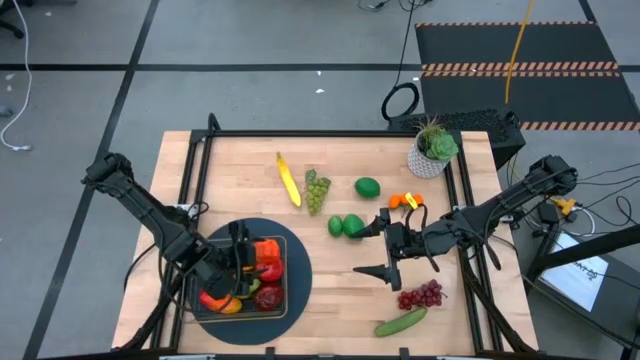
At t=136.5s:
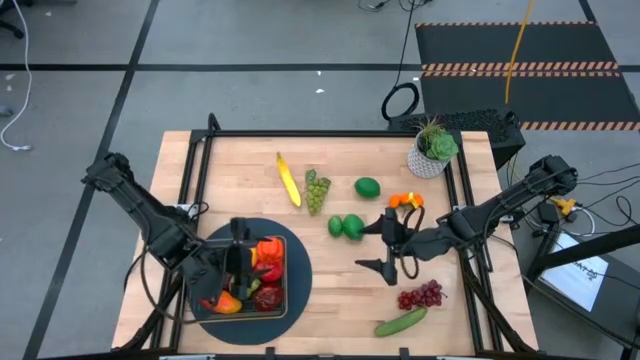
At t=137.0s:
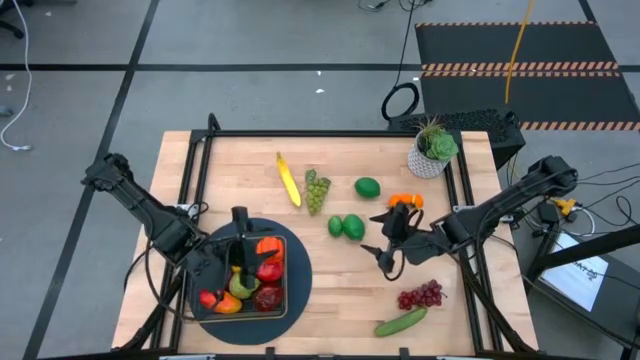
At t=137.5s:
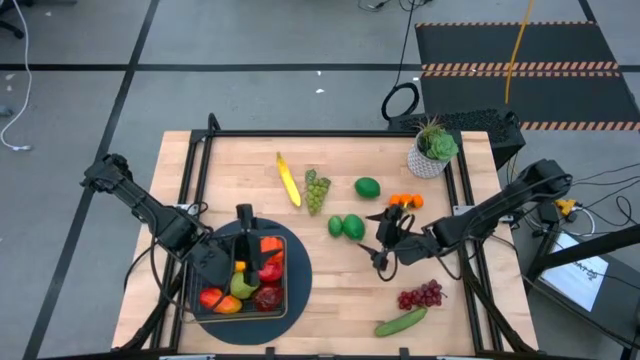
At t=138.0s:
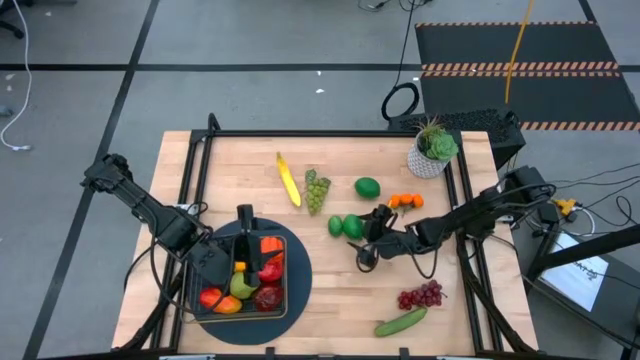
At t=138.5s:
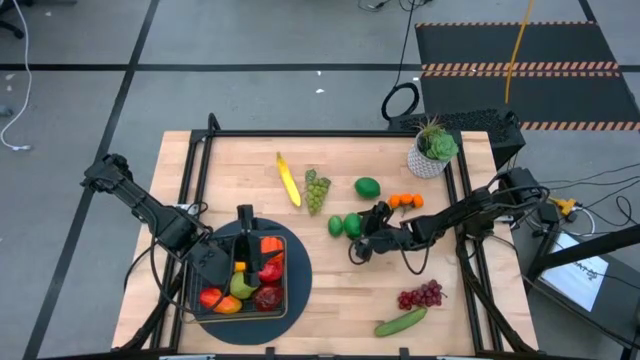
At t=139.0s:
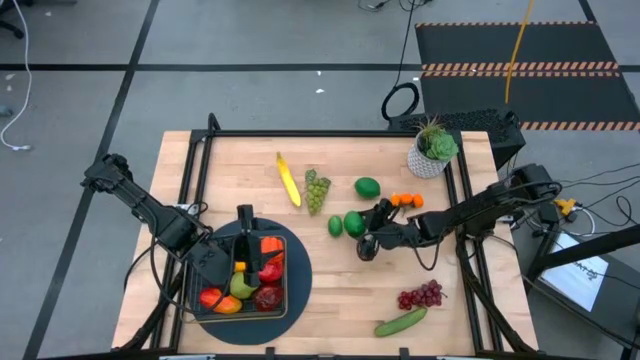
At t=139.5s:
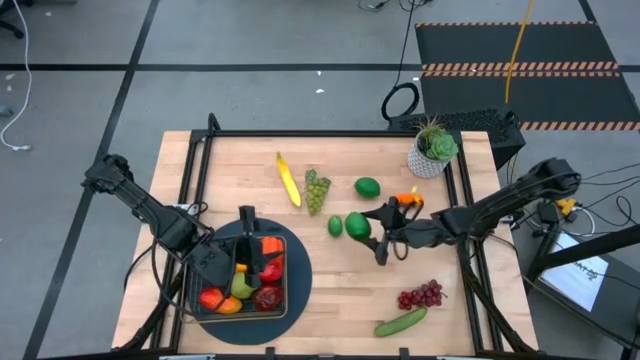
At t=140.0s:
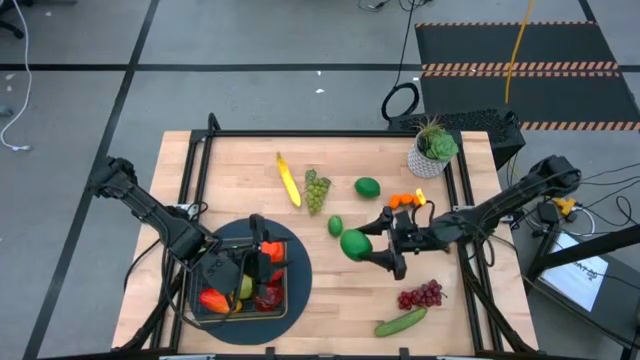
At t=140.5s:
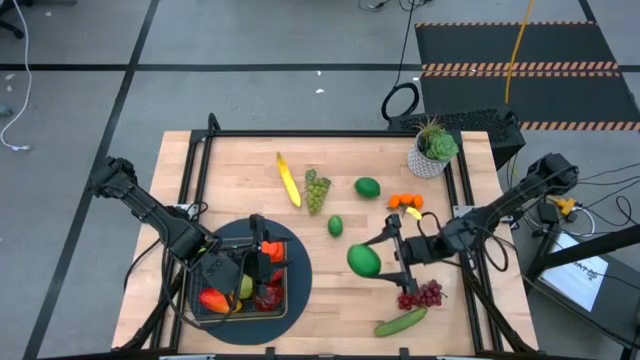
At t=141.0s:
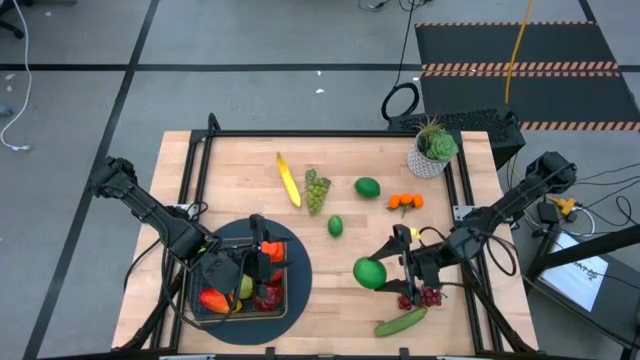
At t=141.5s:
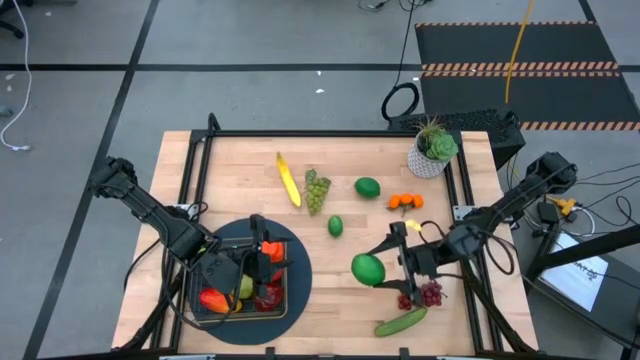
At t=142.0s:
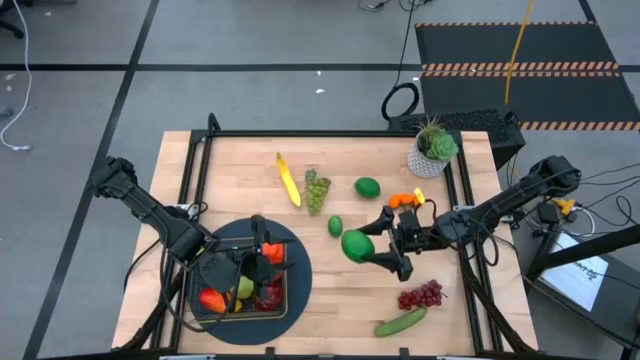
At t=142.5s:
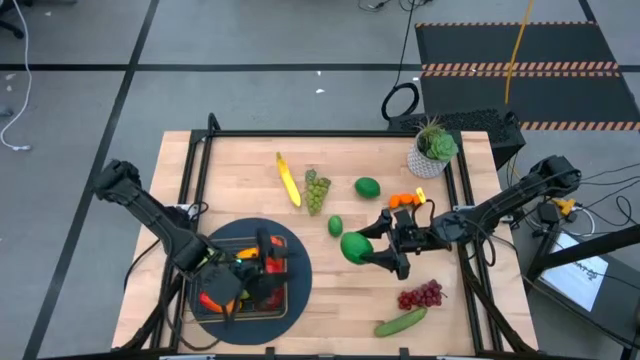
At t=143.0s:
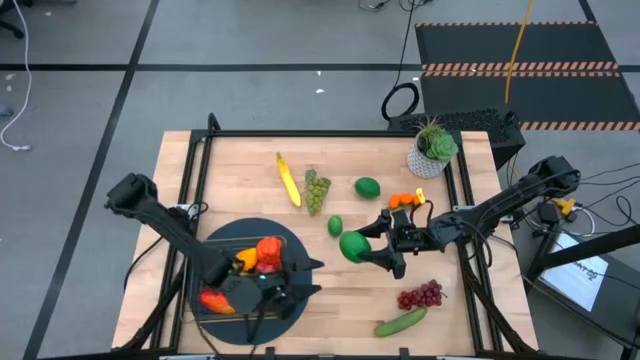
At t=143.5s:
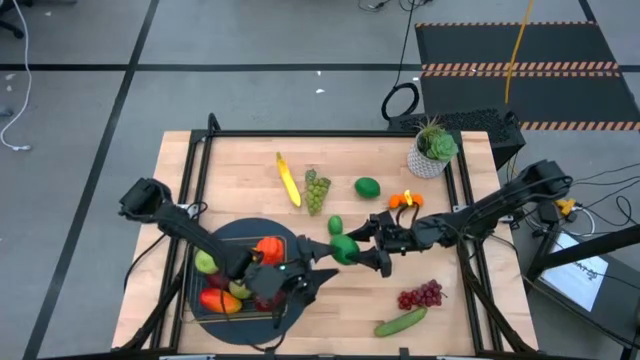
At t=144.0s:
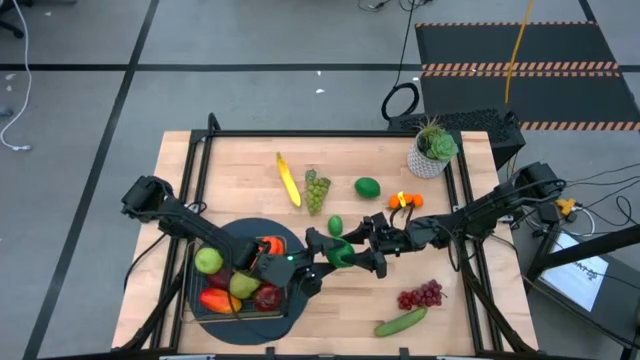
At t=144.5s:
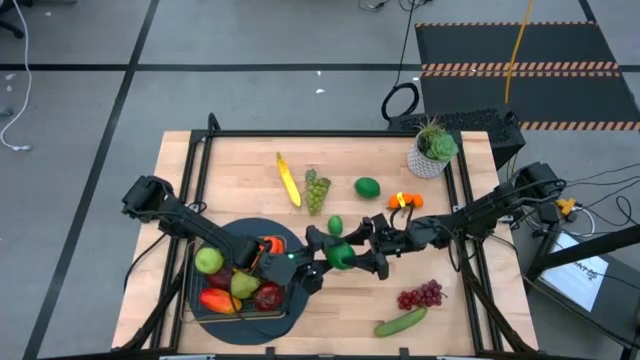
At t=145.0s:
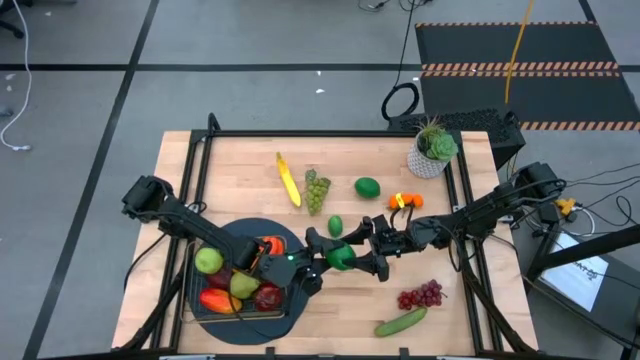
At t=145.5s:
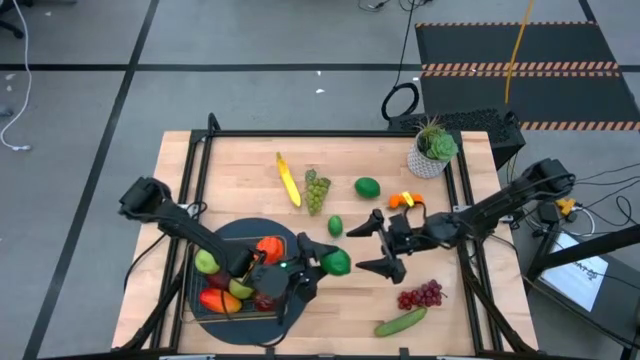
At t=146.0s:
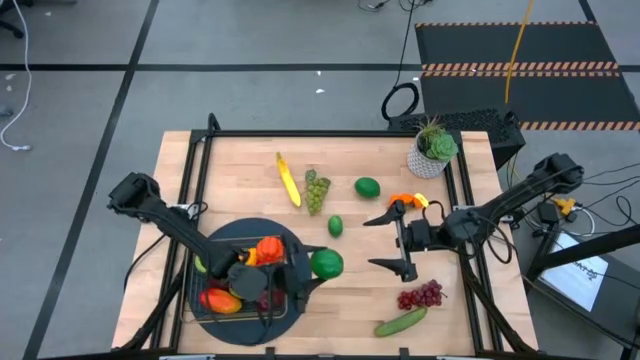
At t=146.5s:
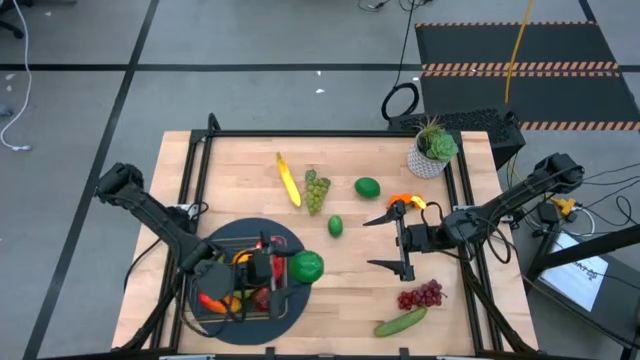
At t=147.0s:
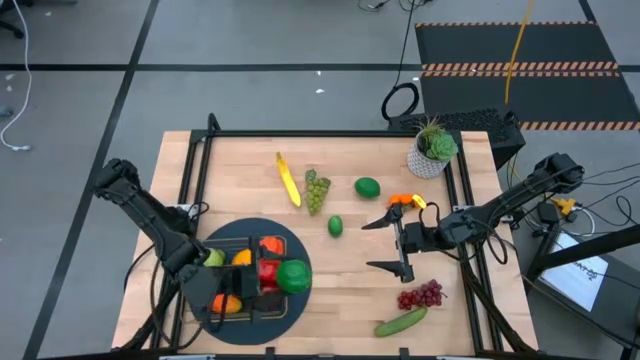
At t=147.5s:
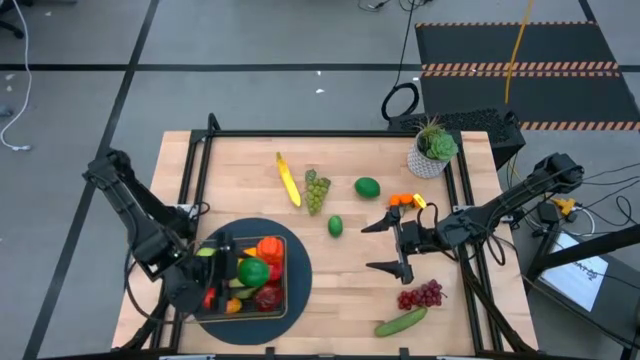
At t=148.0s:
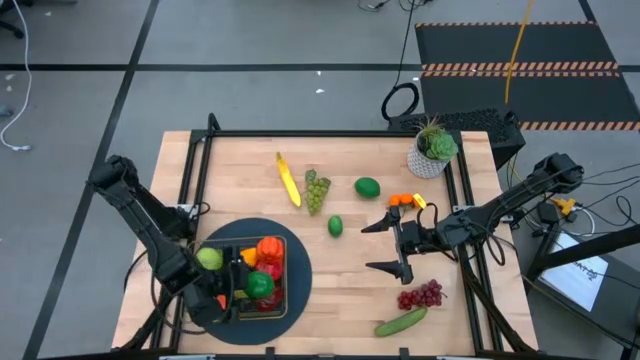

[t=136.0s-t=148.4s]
Task: Build produce basket
Put the bottom right lime into the gold wire basket

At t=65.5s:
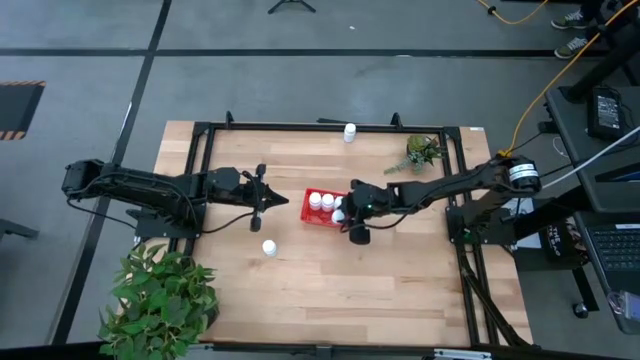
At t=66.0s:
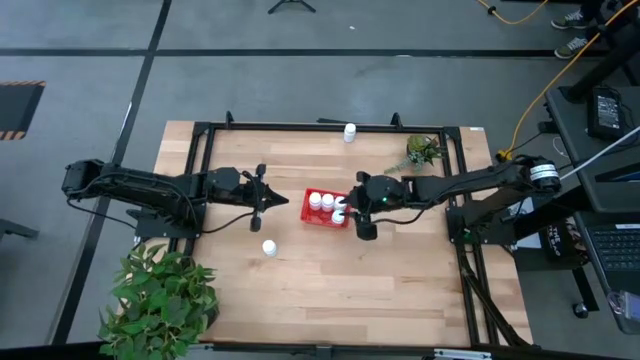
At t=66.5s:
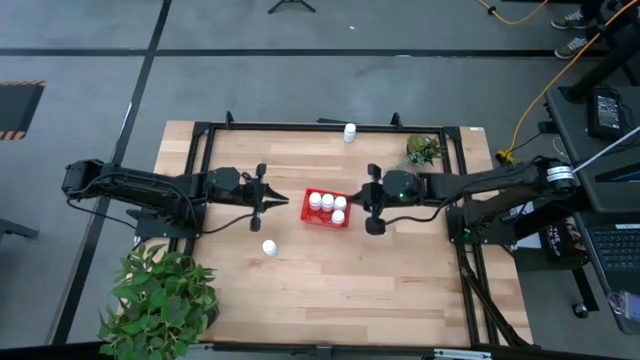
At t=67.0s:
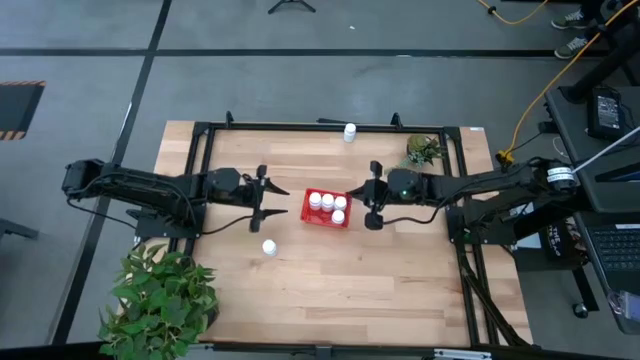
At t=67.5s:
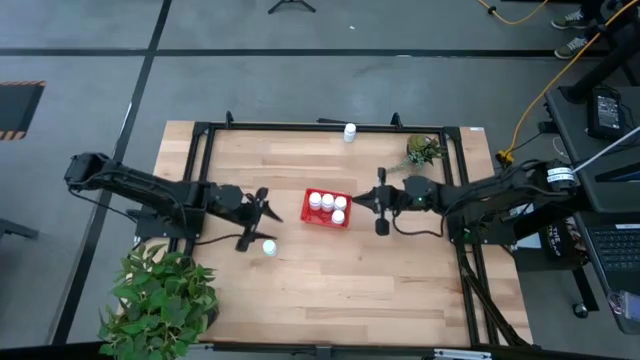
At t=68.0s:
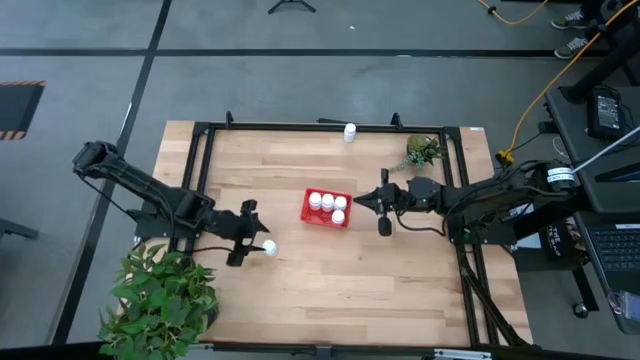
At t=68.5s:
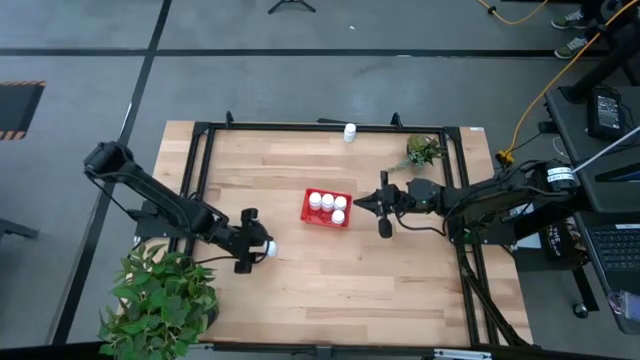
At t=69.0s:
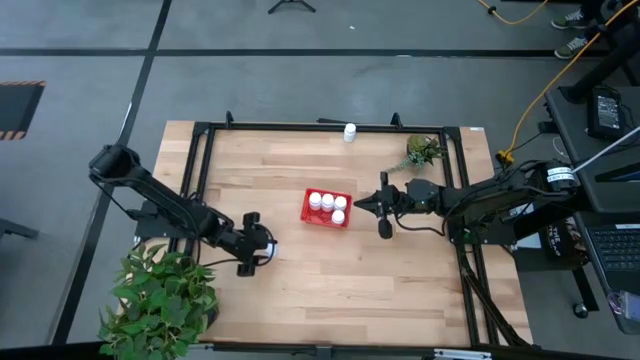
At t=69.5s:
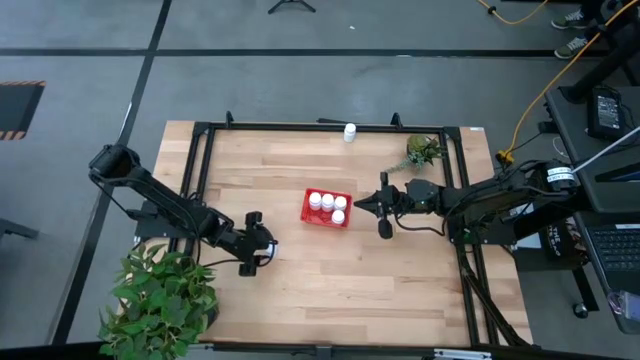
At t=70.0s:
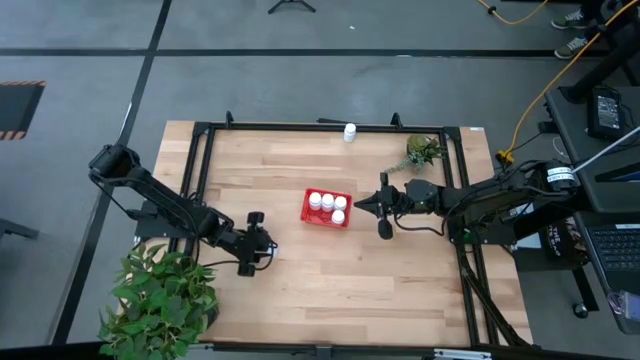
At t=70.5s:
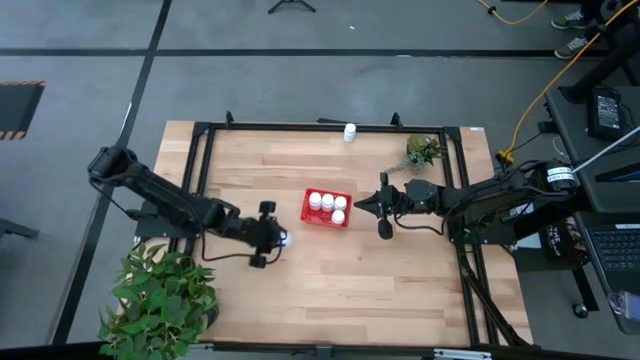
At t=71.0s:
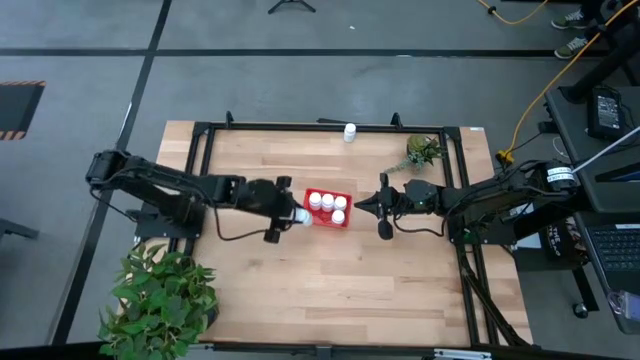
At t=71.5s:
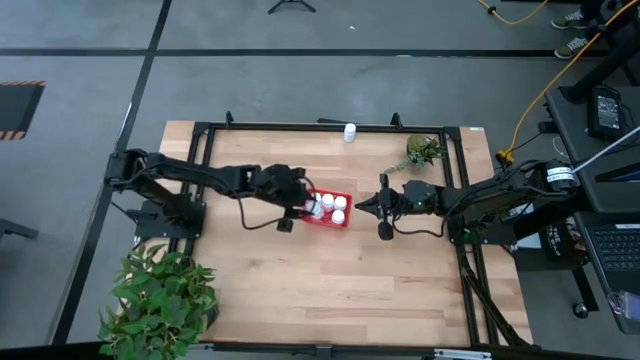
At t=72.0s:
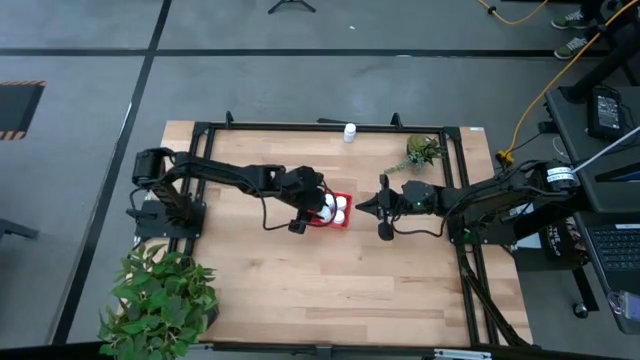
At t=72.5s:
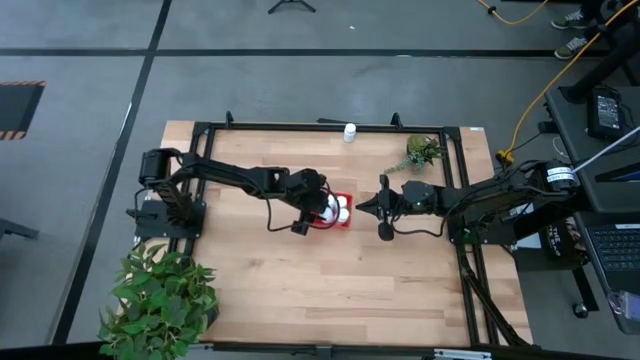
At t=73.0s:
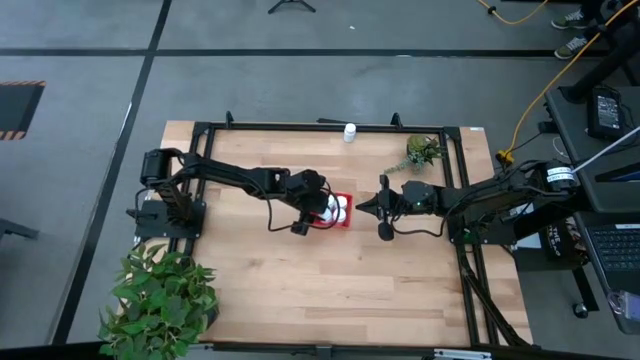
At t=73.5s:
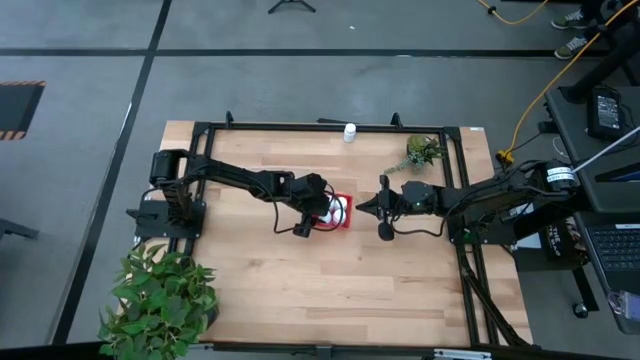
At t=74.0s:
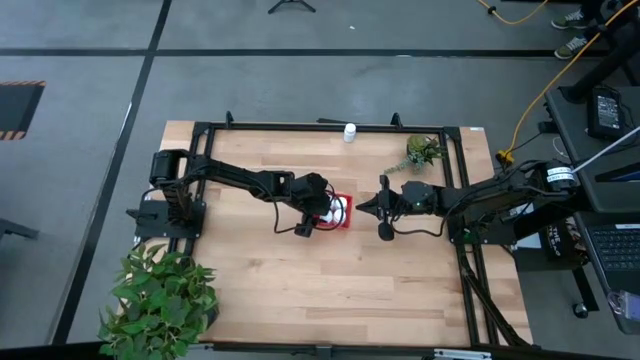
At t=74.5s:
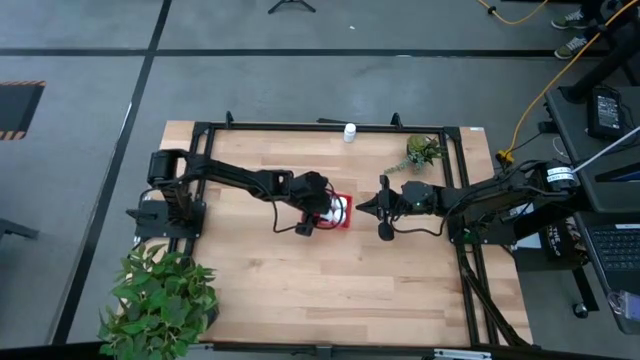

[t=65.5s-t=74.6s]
Task: Pick and place pill bottles into a basket
Put the white pill bottle into the red basket
